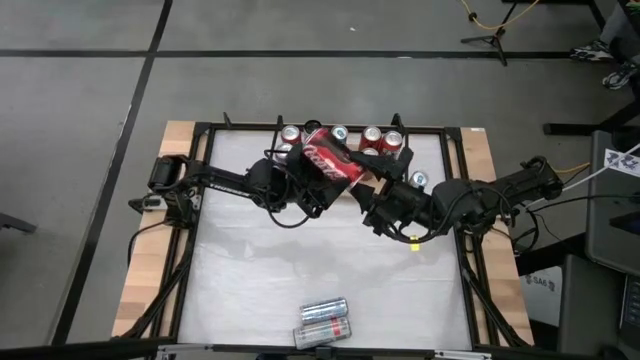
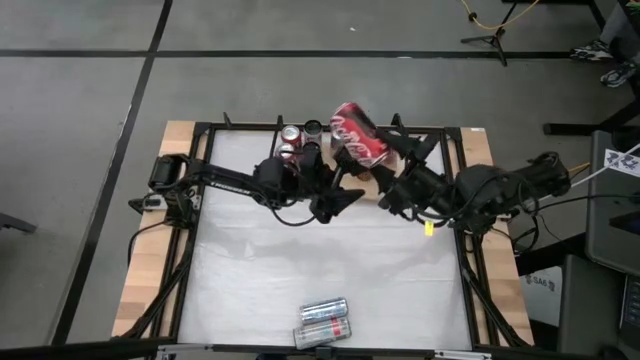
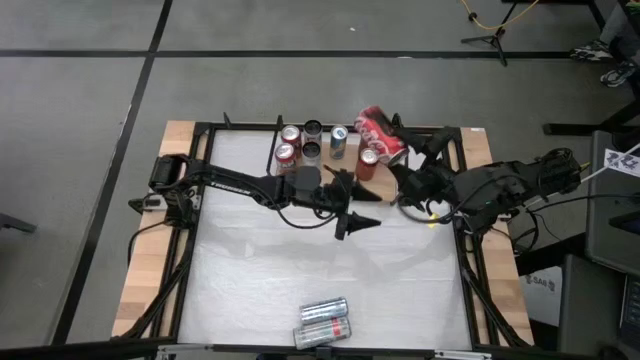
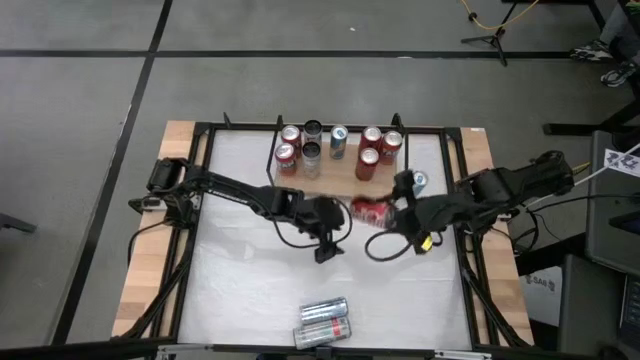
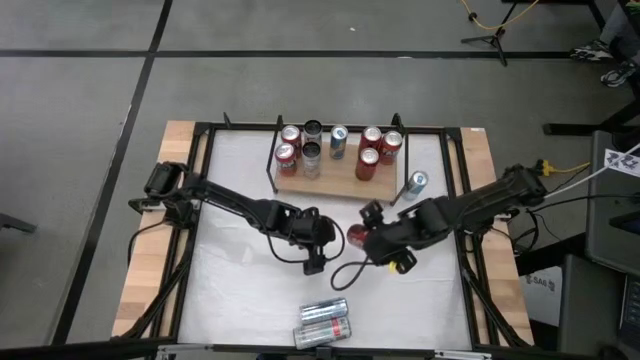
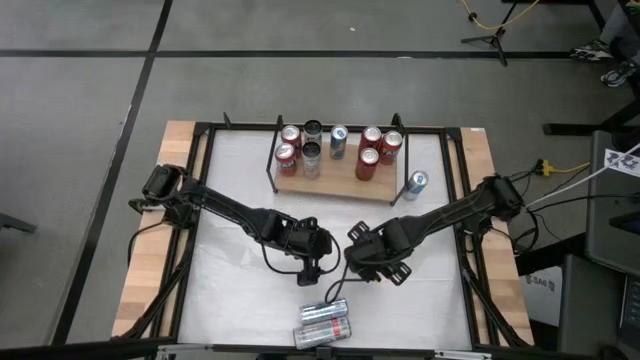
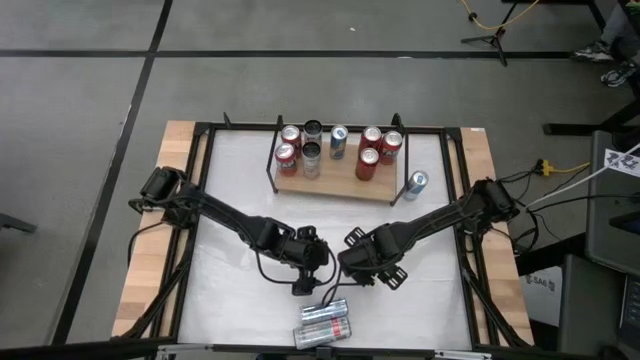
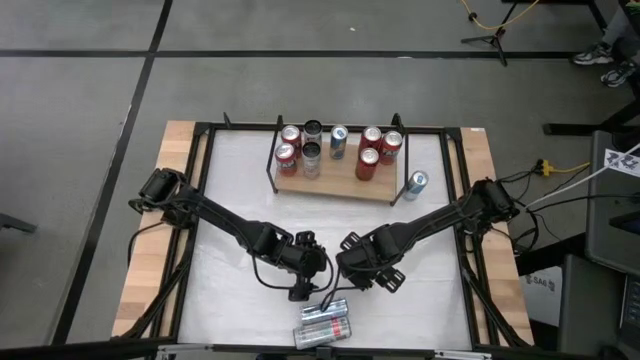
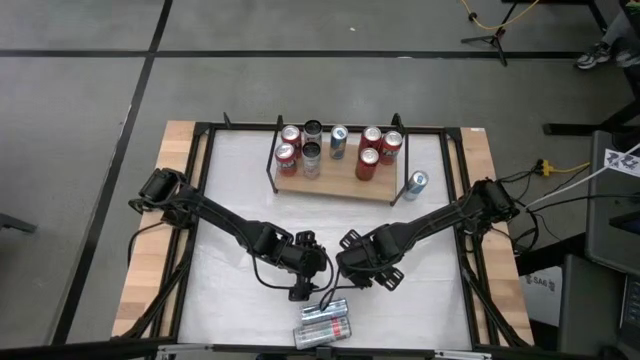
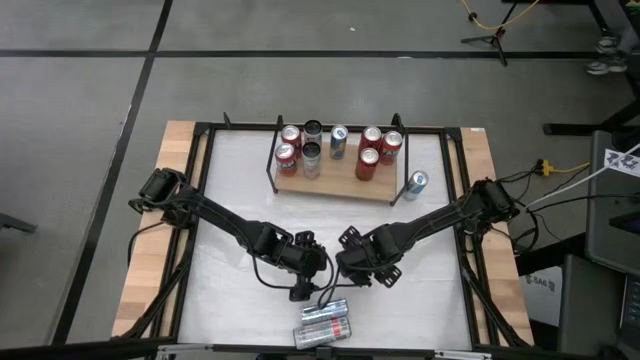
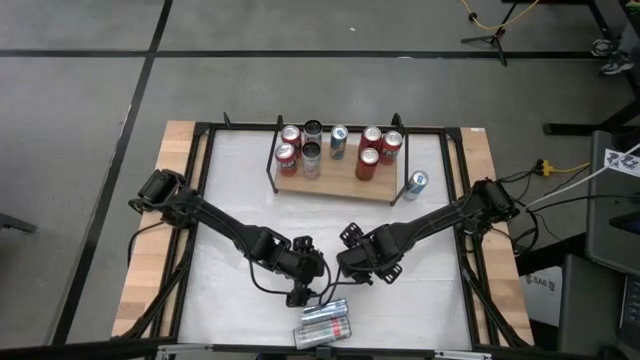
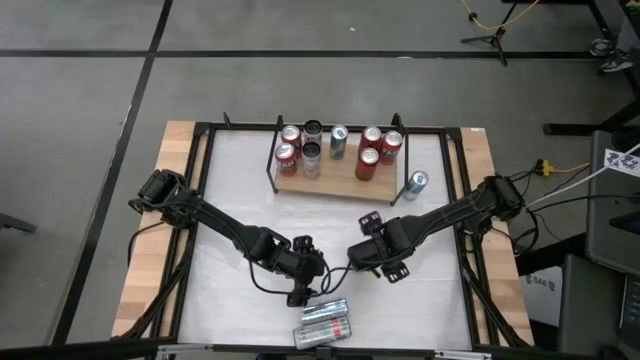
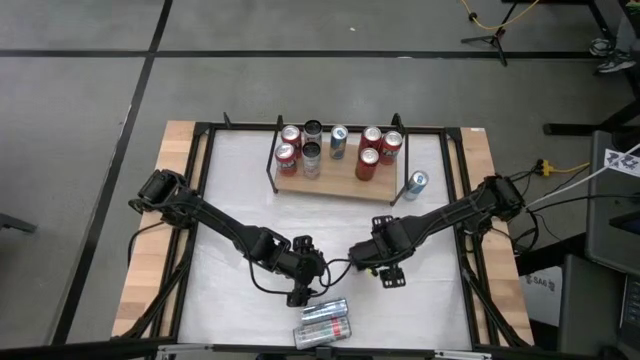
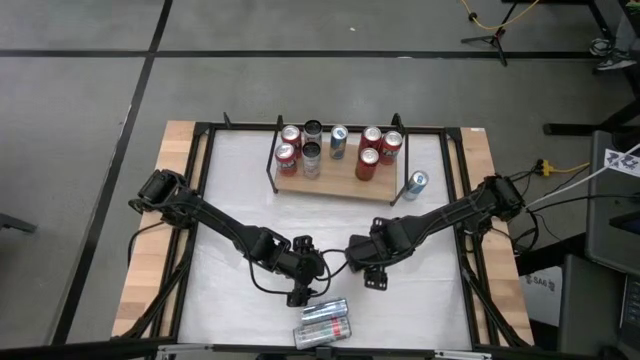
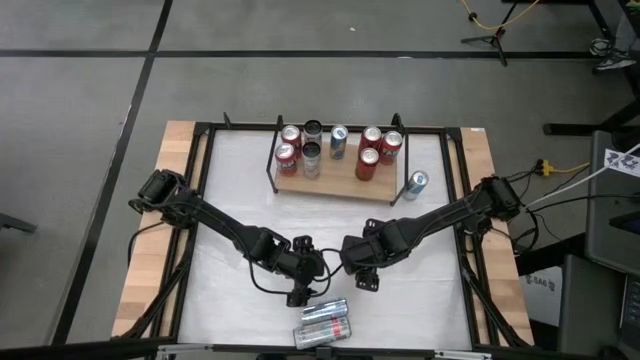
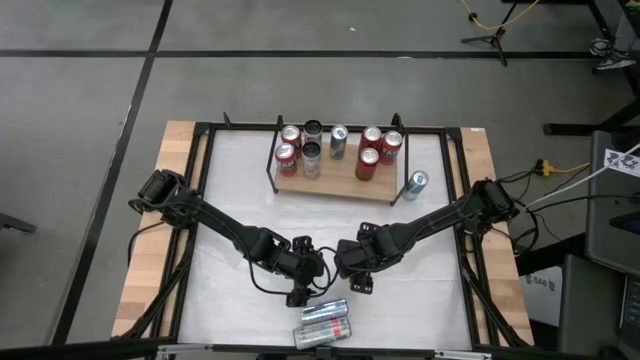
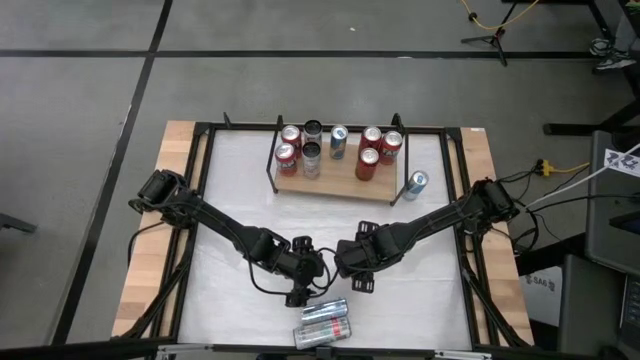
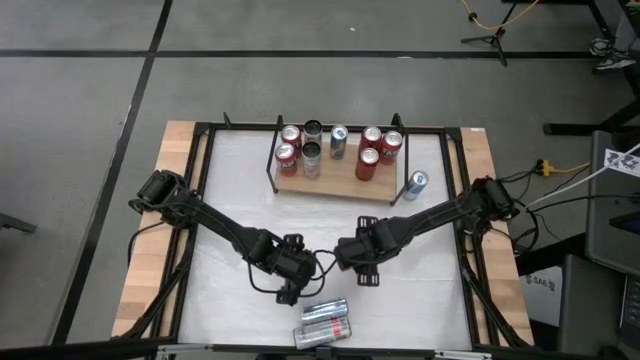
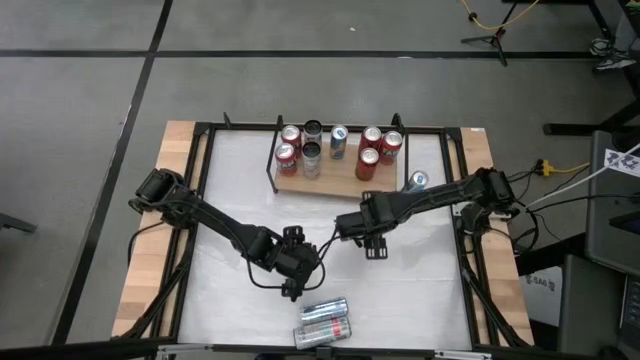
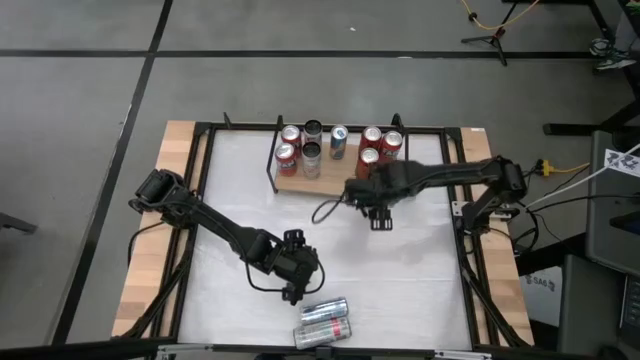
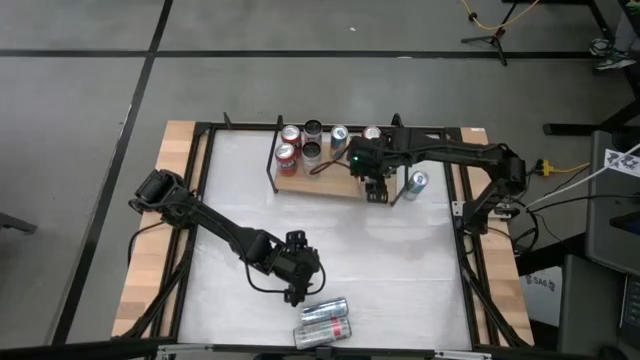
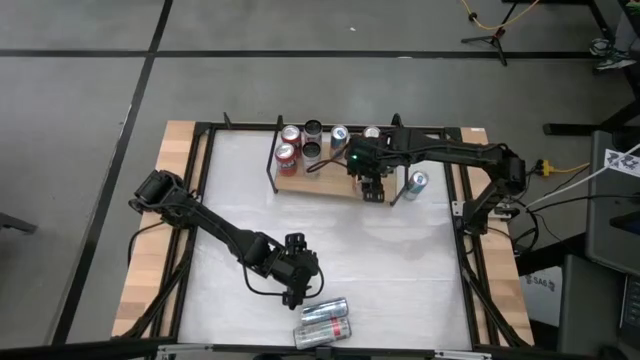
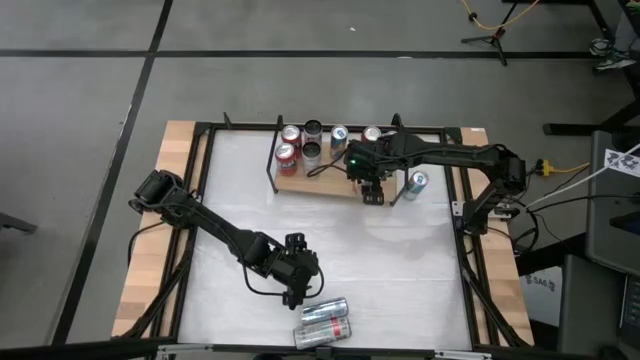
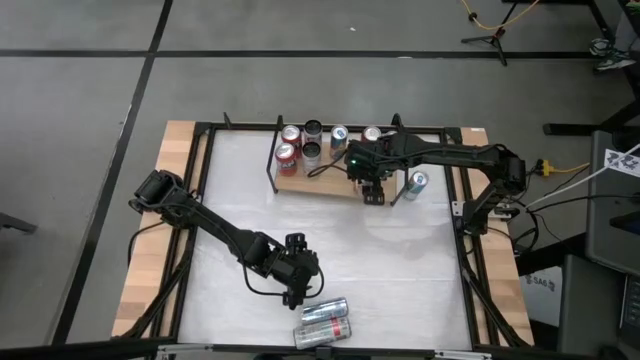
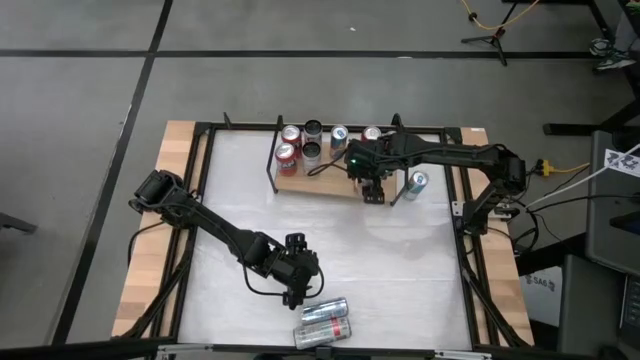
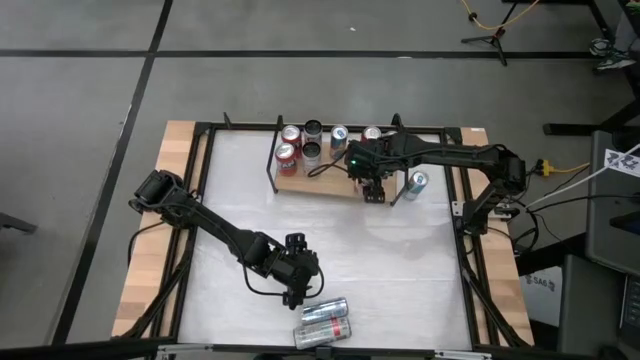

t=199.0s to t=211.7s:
Task: Place canned beverage on shelf
Put the red-white soda can on the shelf aligned with the red-black soda cans

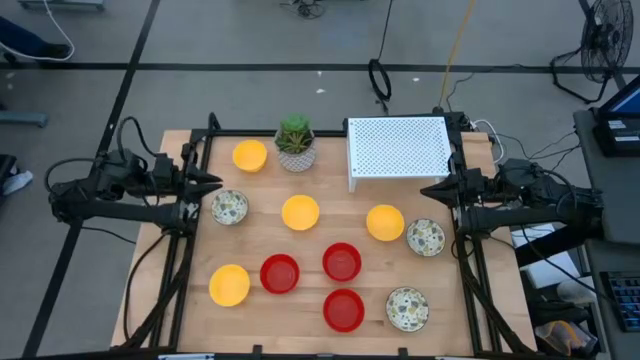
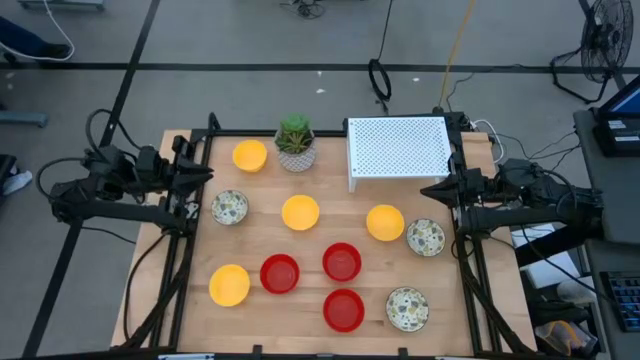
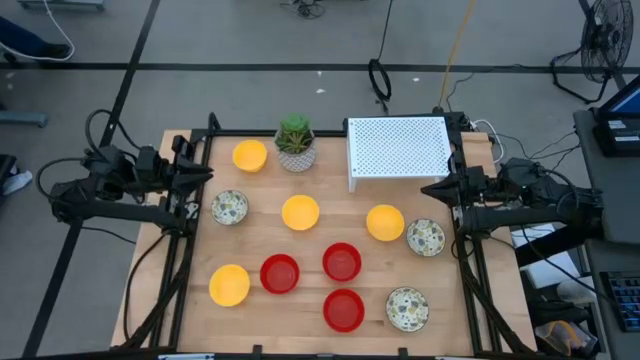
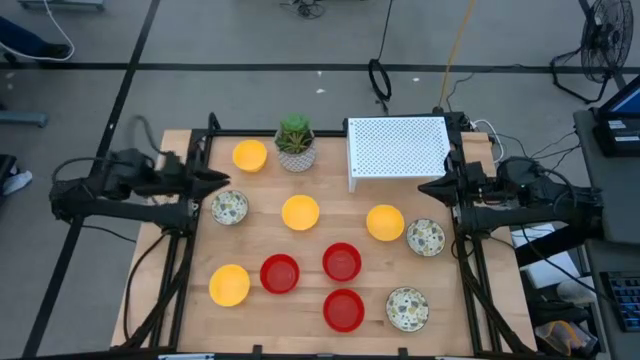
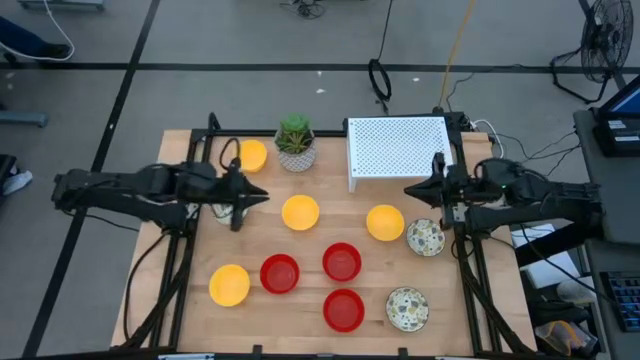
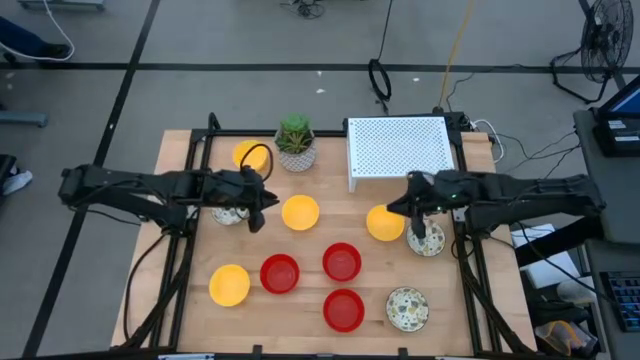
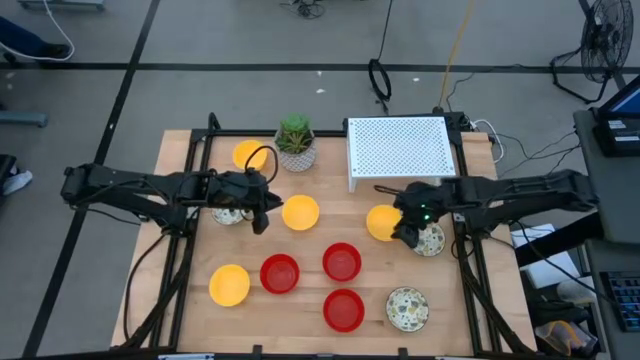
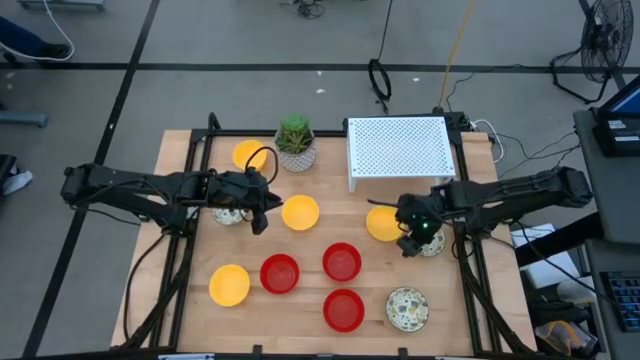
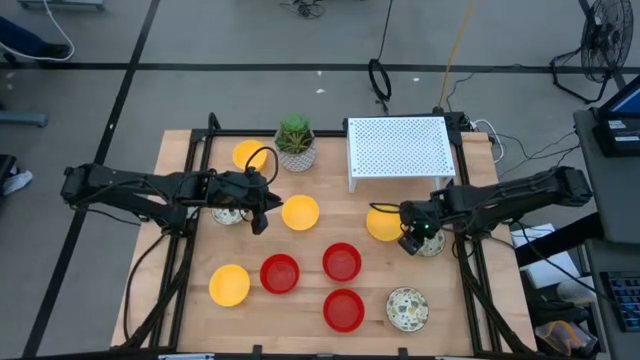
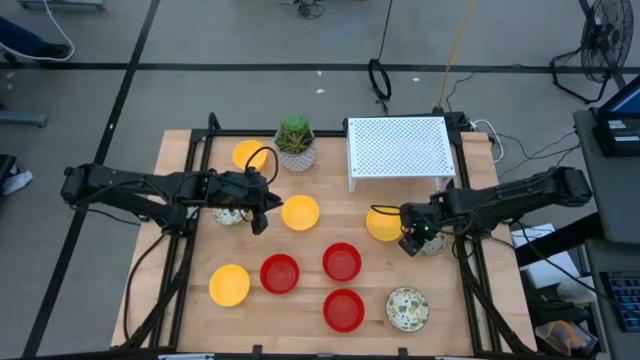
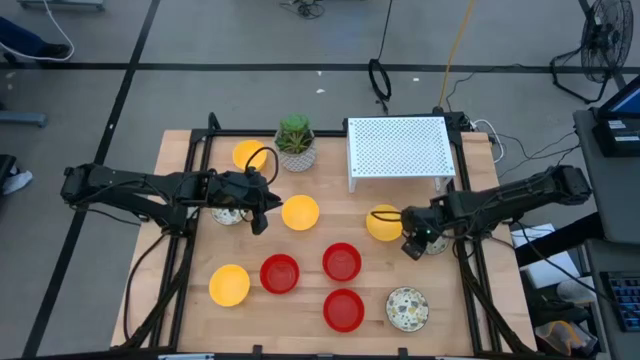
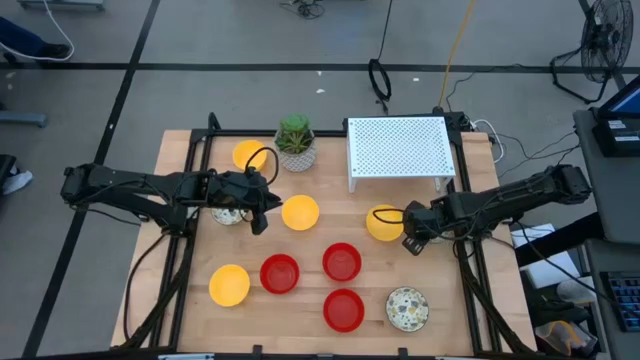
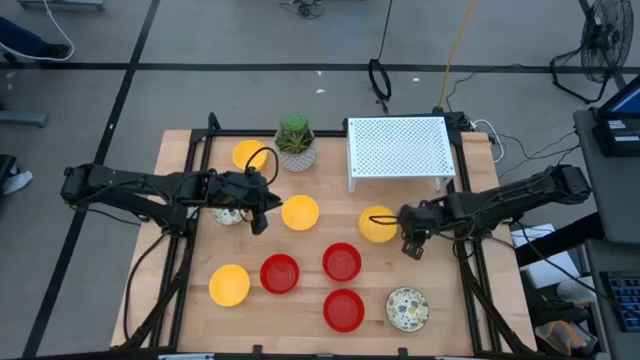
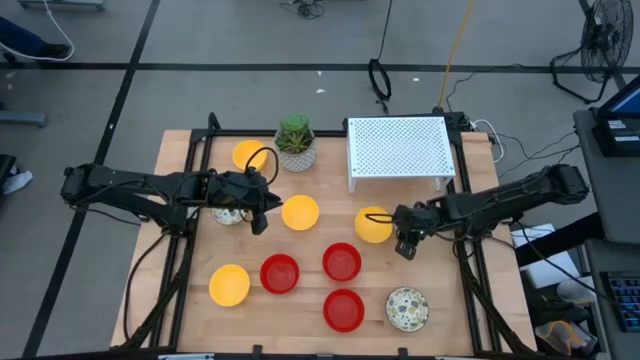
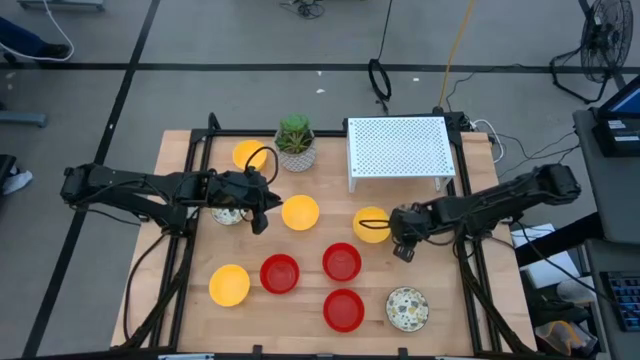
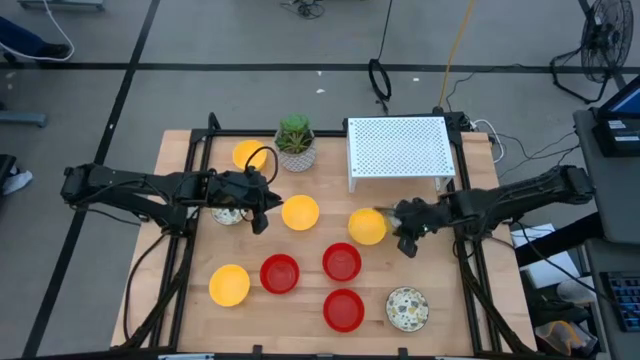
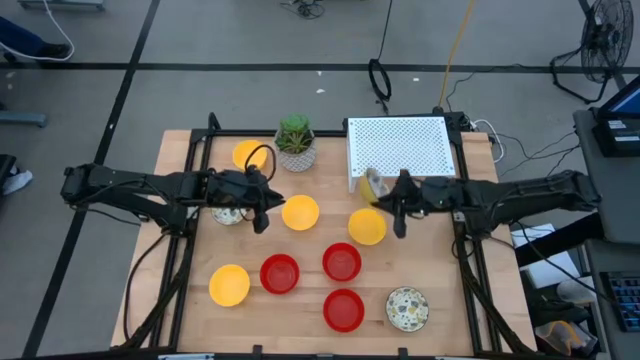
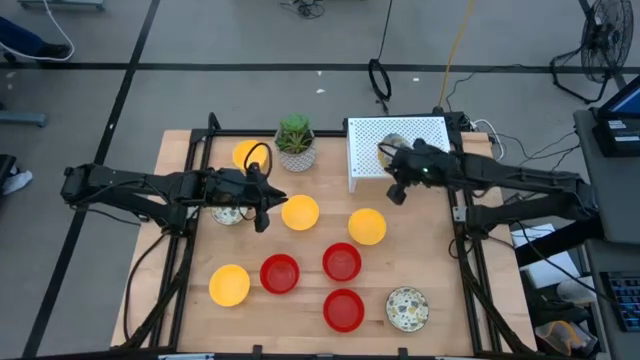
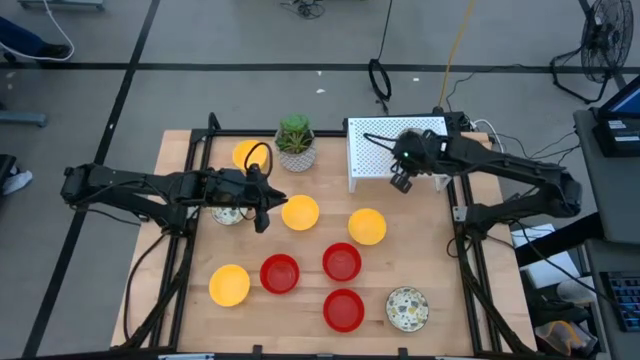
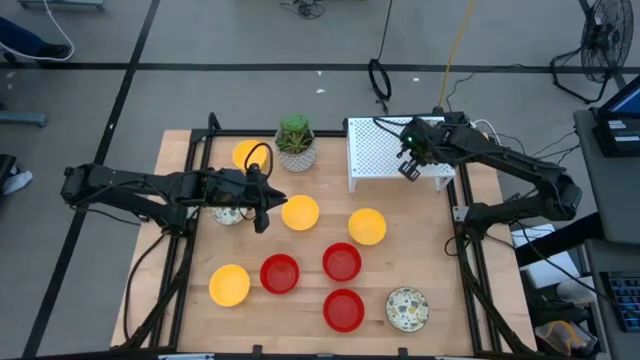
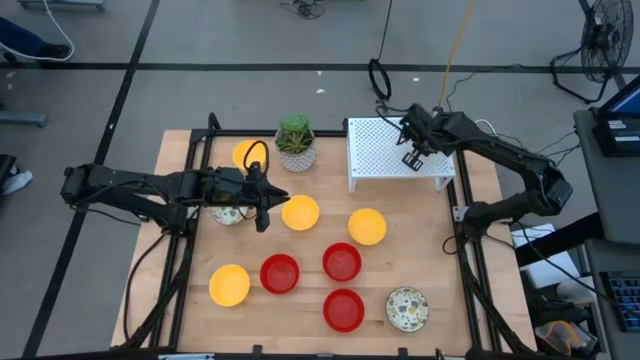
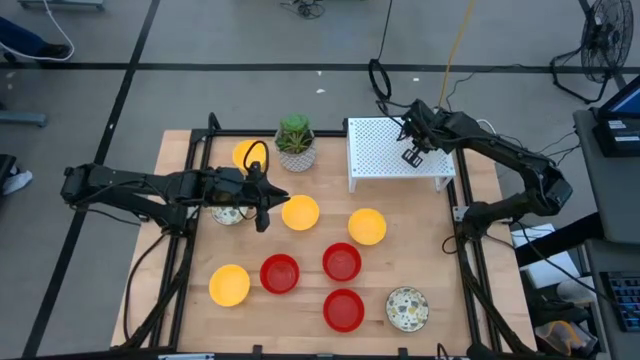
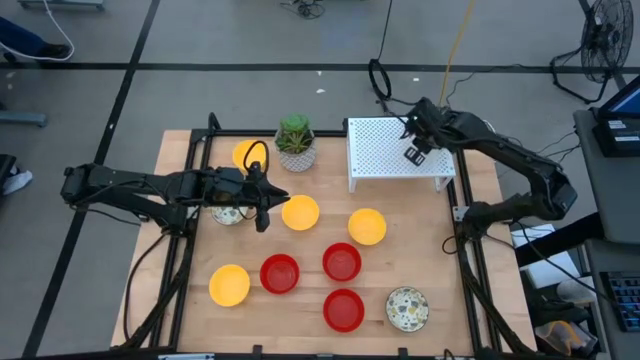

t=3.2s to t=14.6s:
Task: Pick & Place Mini bowls
Put the white and yellow bowl on the shelf
